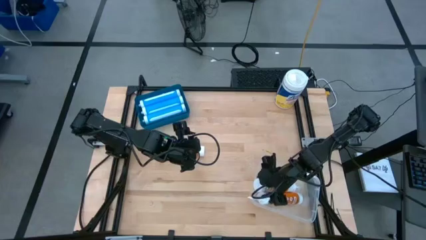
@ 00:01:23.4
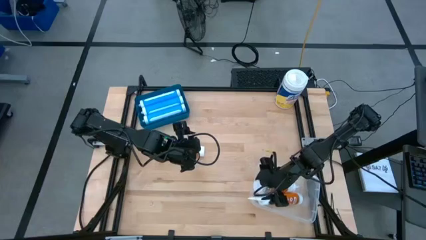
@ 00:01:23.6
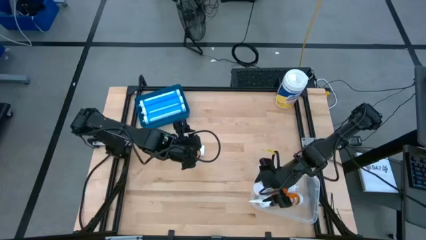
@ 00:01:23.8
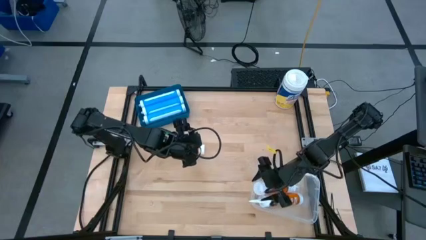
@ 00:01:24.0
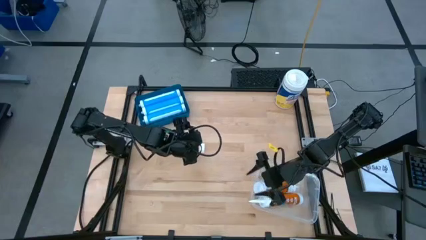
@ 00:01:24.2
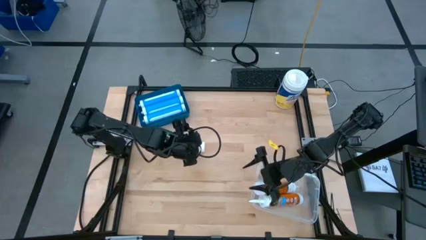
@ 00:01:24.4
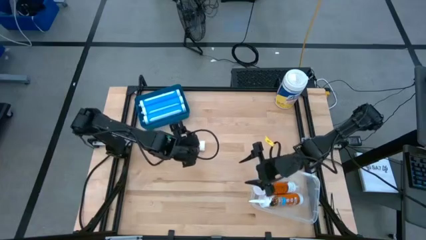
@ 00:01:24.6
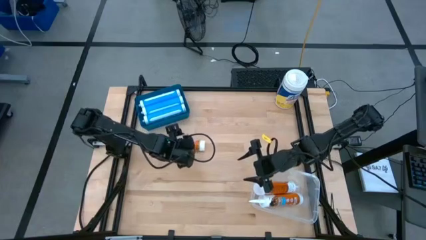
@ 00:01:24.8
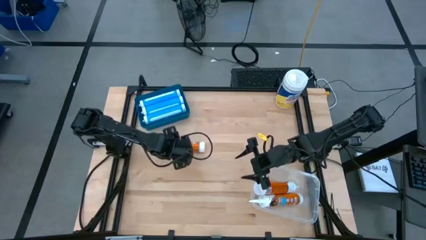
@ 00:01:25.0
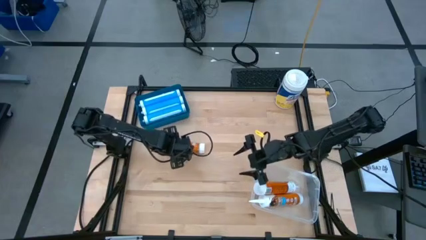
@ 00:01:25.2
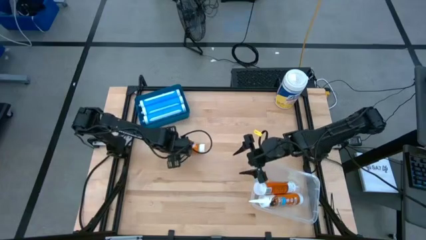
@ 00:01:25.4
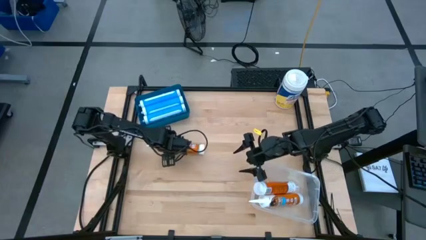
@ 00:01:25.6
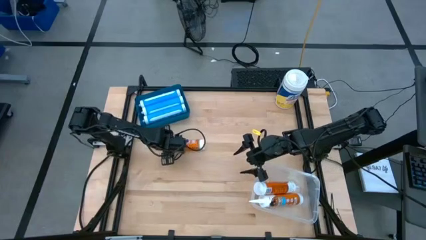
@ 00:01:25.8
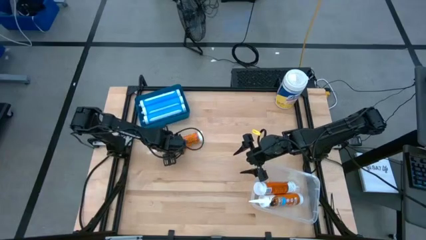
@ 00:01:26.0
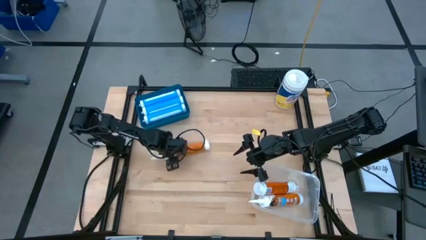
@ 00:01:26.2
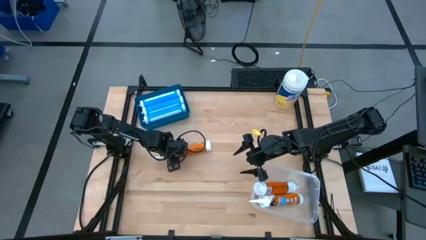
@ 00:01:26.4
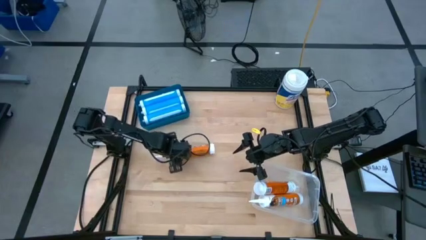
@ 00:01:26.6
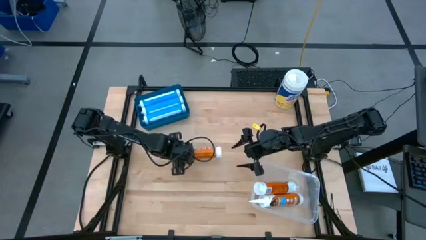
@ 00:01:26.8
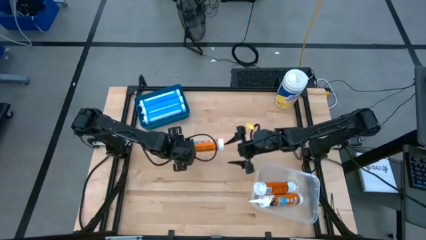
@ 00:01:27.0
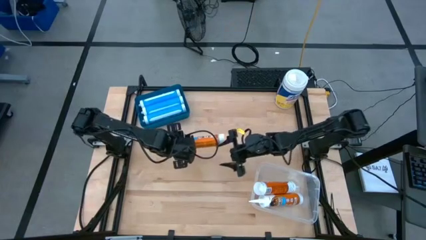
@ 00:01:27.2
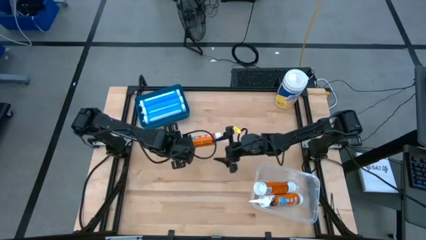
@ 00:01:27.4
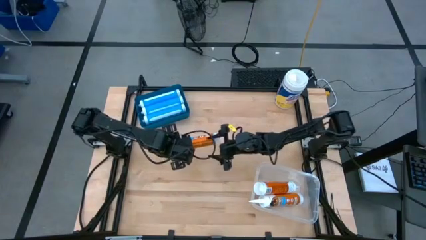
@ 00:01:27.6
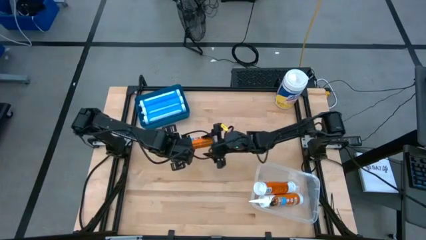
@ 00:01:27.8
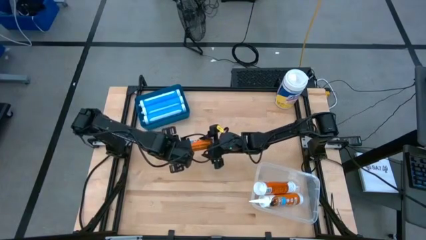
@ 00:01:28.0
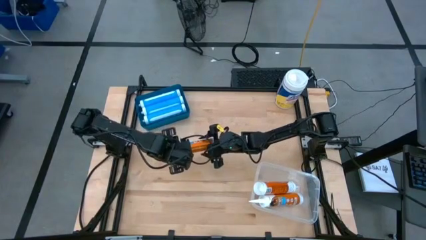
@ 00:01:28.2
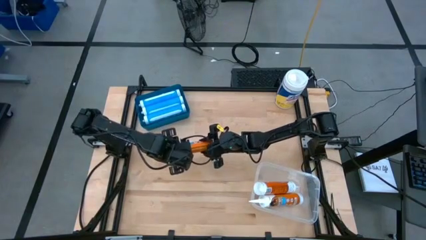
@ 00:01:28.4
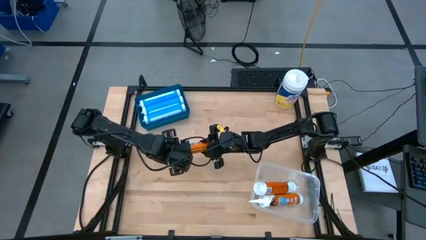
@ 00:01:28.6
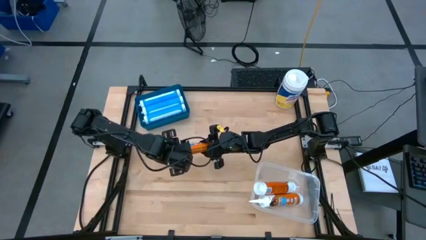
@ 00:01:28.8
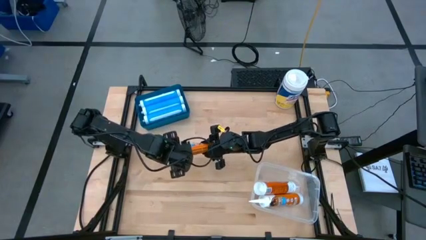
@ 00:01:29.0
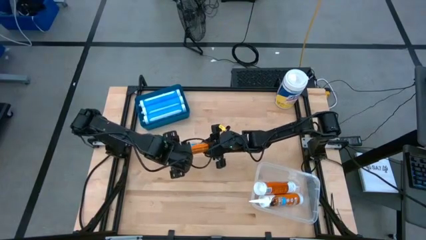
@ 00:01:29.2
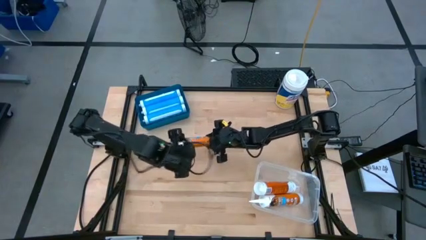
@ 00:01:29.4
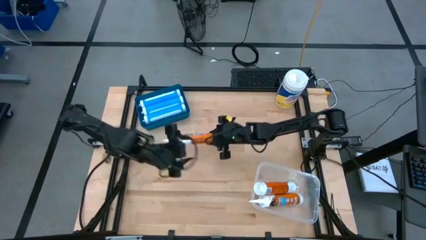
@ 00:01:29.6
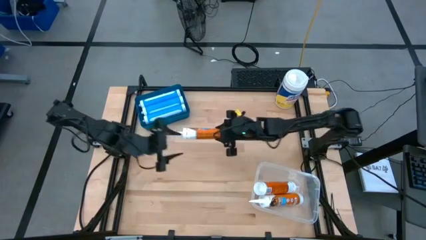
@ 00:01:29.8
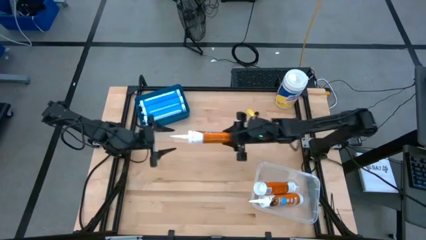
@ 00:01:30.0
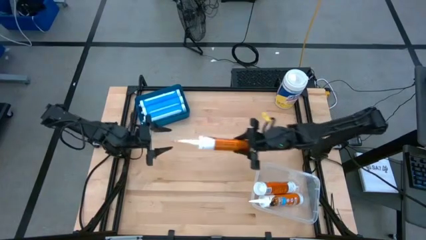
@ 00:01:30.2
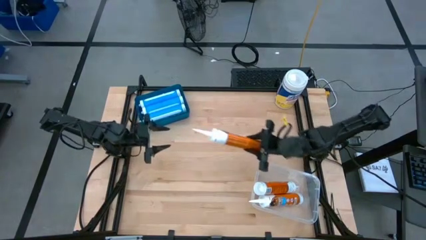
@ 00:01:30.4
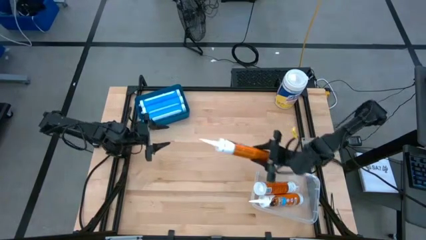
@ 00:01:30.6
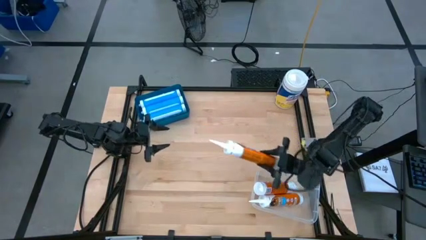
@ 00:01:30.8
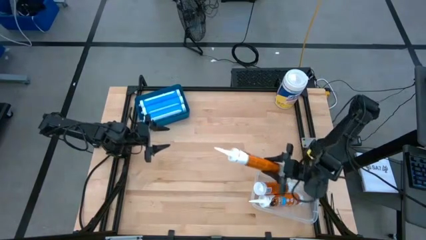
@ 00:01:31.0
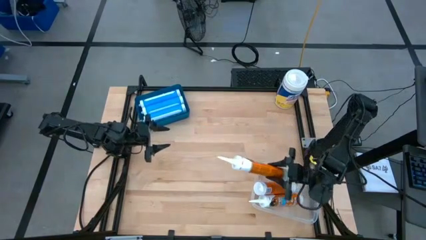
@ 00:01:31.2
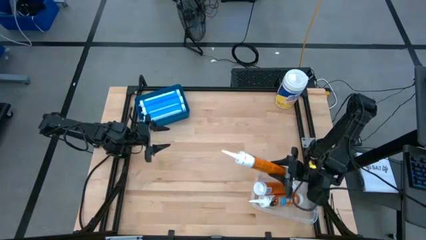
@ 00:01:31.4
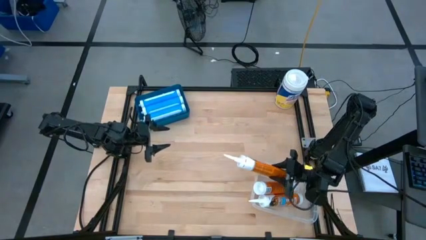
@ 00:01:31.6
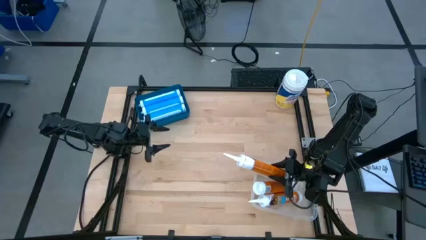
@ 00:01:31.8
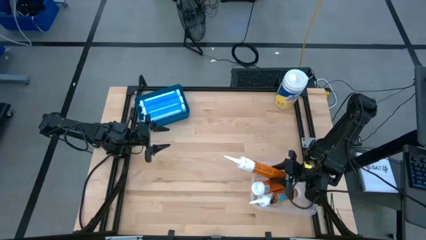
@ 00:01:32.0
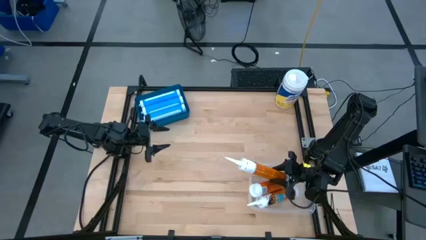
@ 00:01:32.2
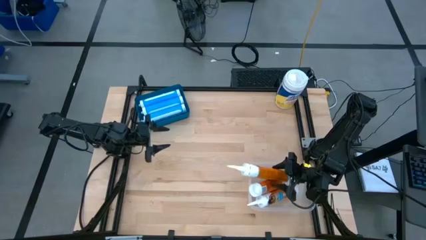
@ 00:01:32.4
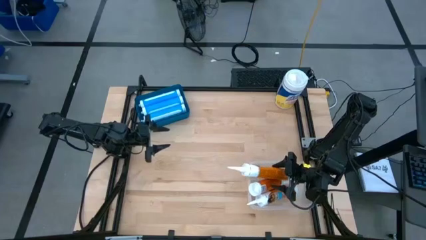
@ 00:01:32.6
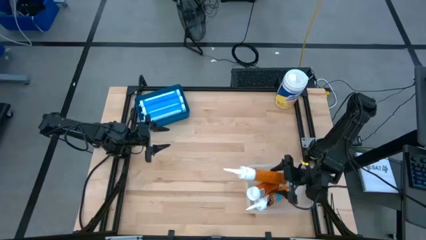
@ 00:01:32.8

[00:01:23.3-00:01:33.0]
Task: Pick & place silicon tubes, Sealant and Lysol wipes
Put the orange sealant into the transparent bin
